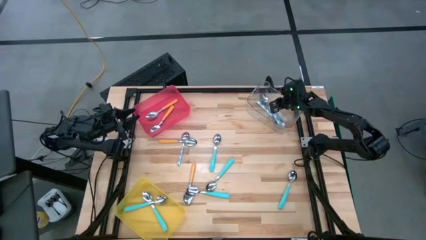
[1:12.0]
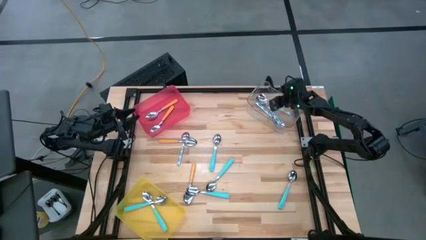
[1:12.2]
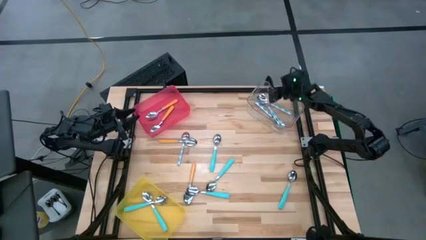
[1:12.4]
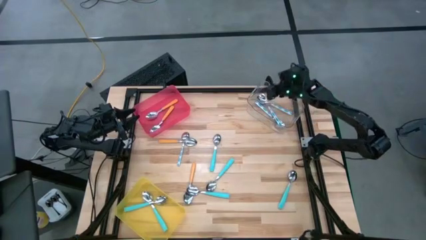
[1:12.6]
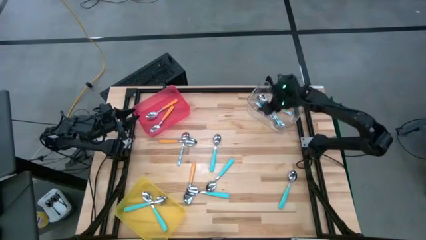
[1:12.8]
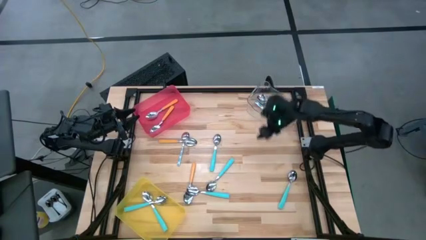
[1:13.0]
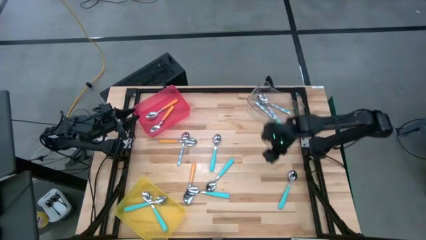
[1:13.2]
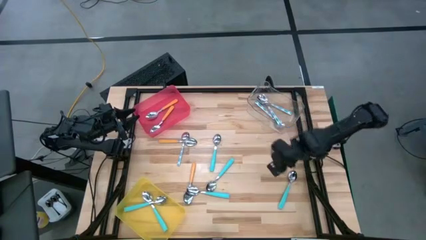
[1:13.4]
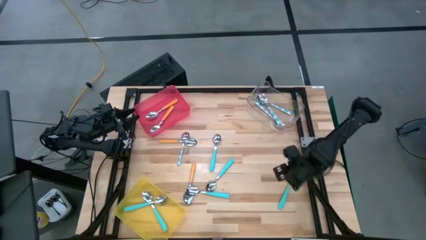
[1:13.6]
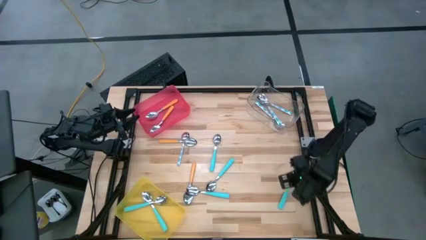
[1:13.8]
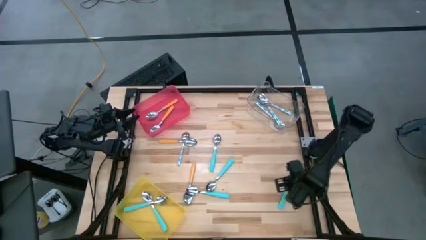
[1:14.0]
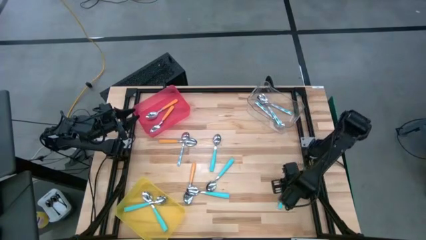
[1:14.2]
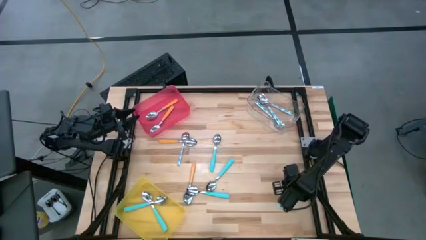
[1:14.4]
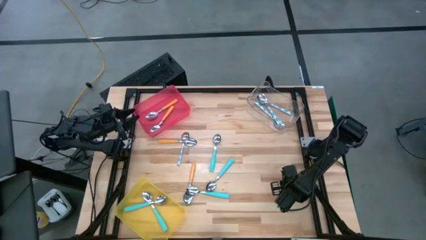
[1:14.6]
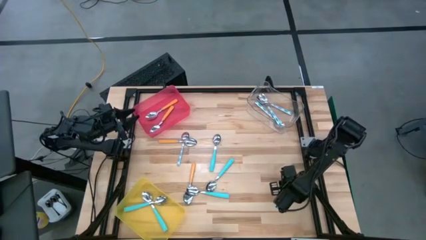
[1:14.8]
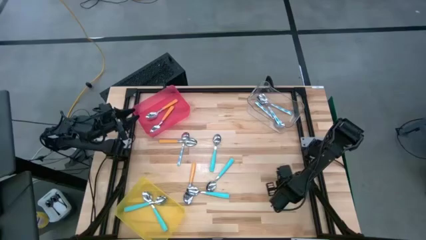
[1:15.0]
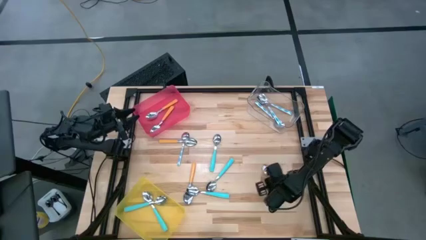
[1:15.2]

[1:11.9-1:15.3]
Task: Sort silverware by color (type)
Put the light blue spoon into the yellow bin

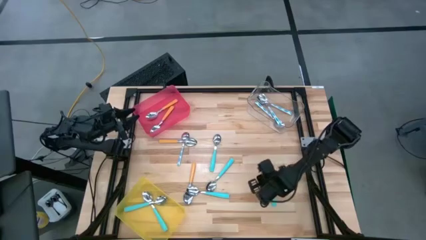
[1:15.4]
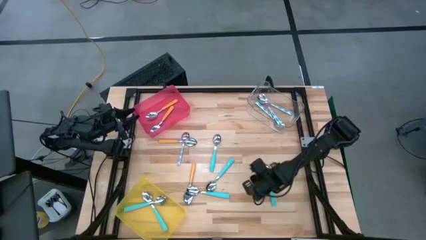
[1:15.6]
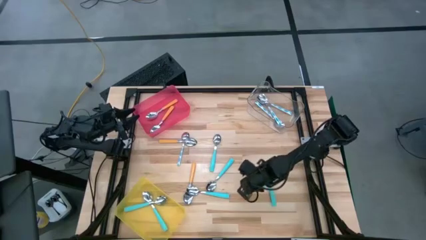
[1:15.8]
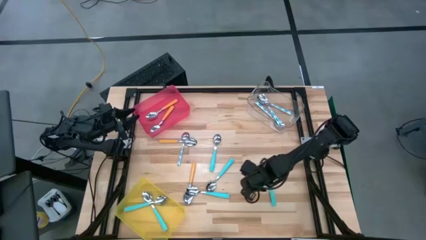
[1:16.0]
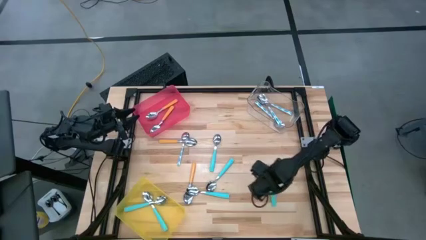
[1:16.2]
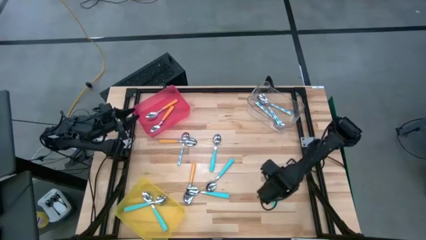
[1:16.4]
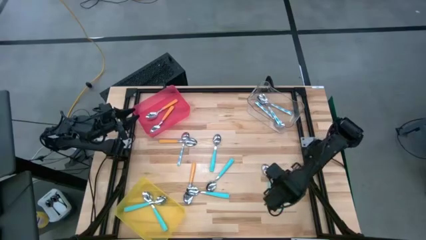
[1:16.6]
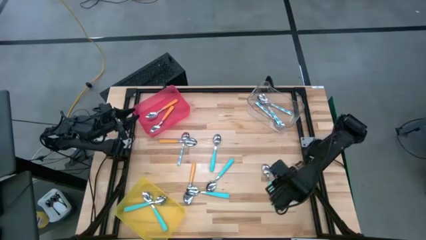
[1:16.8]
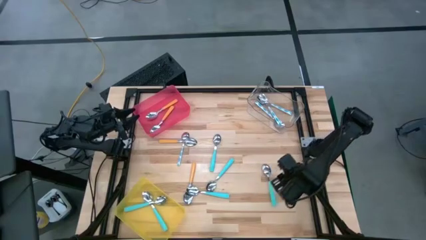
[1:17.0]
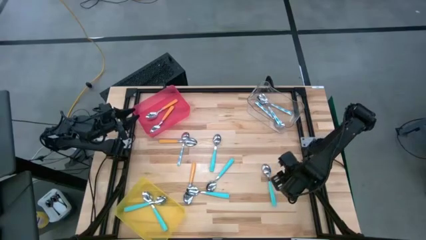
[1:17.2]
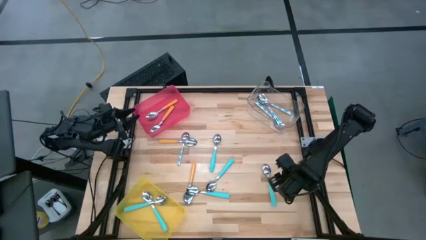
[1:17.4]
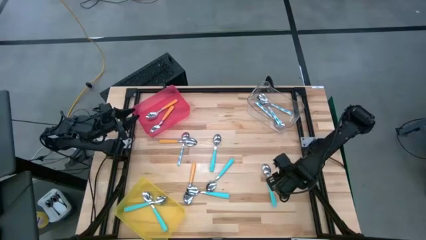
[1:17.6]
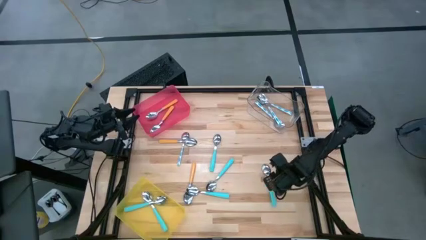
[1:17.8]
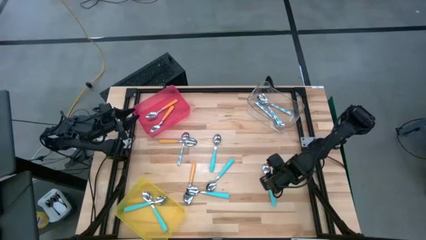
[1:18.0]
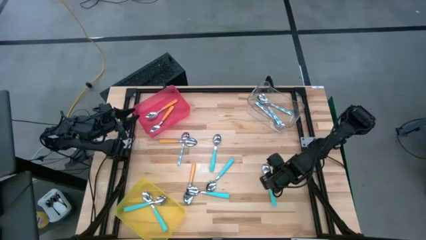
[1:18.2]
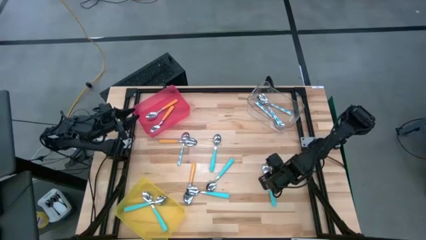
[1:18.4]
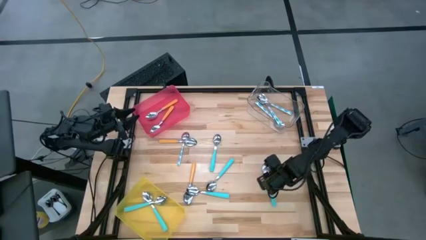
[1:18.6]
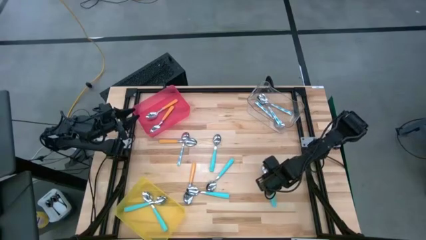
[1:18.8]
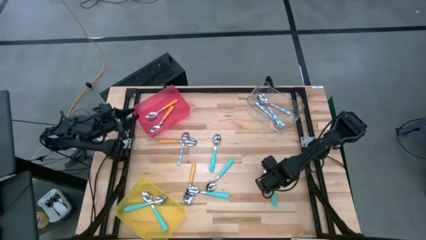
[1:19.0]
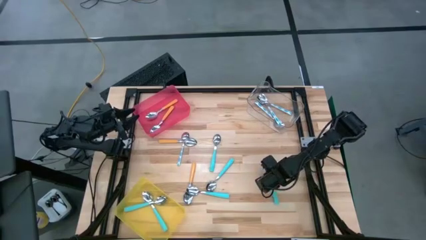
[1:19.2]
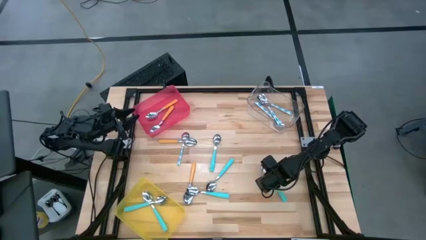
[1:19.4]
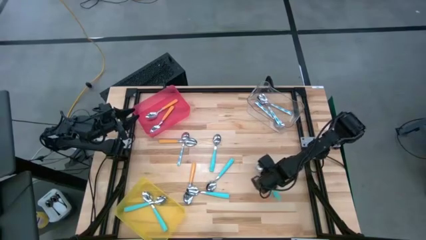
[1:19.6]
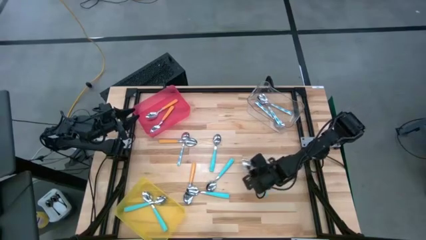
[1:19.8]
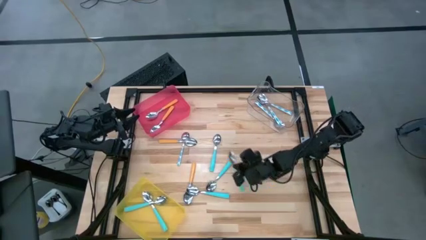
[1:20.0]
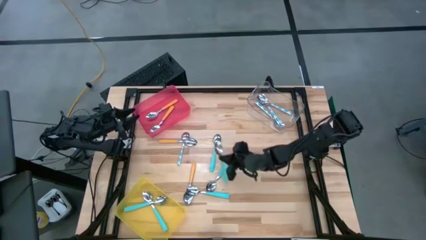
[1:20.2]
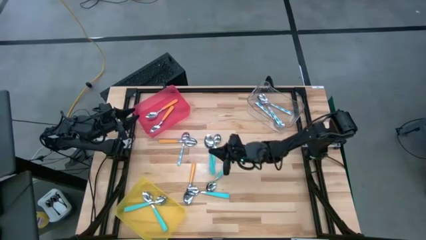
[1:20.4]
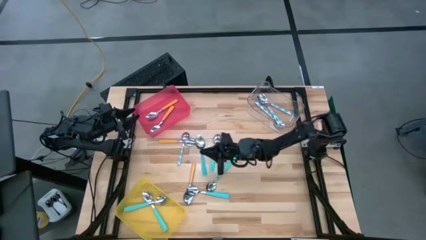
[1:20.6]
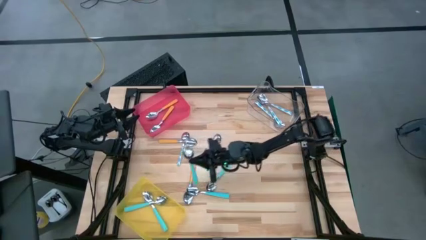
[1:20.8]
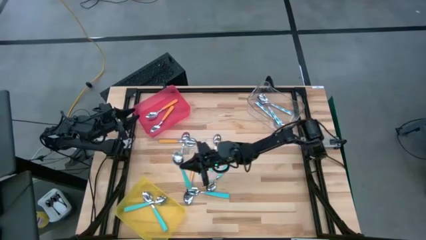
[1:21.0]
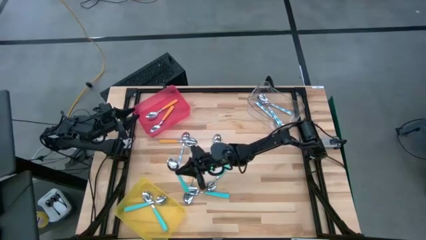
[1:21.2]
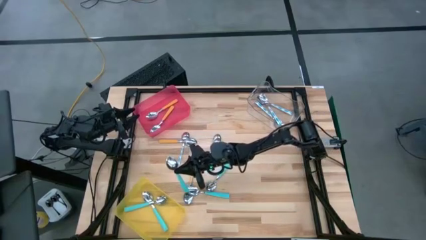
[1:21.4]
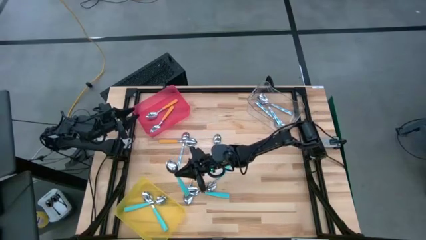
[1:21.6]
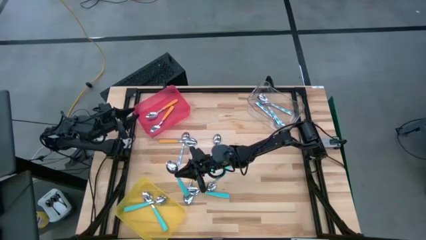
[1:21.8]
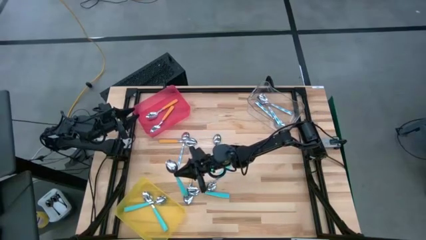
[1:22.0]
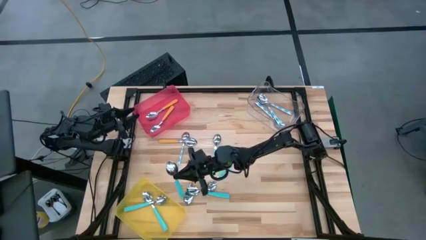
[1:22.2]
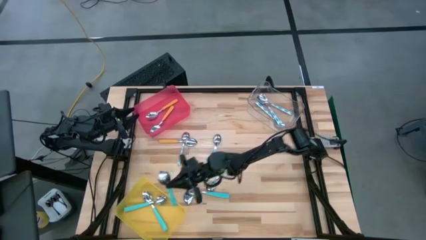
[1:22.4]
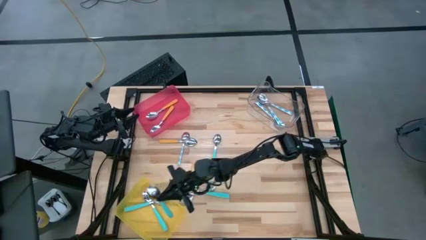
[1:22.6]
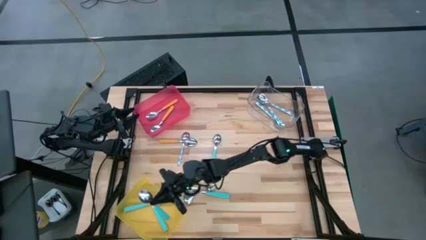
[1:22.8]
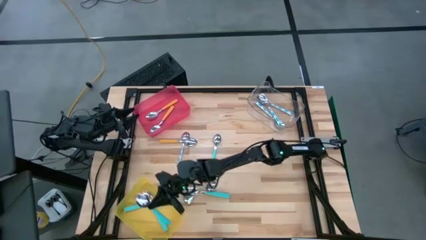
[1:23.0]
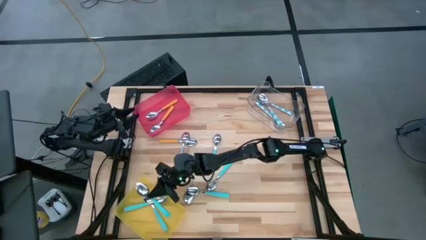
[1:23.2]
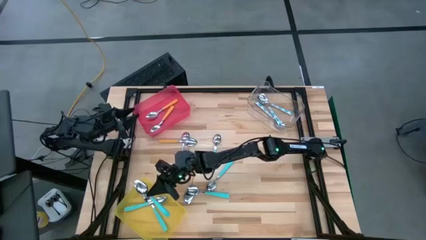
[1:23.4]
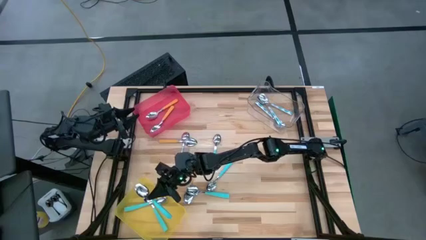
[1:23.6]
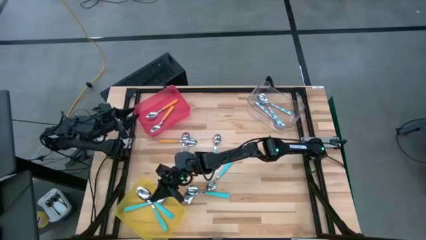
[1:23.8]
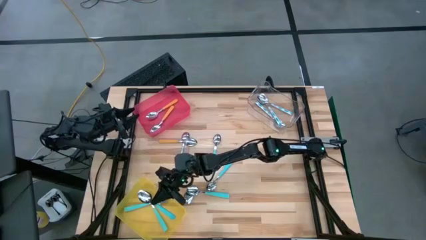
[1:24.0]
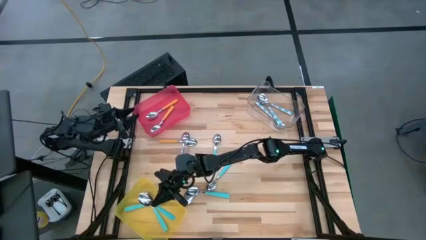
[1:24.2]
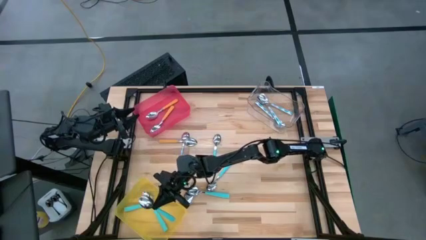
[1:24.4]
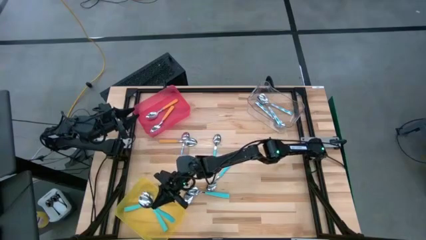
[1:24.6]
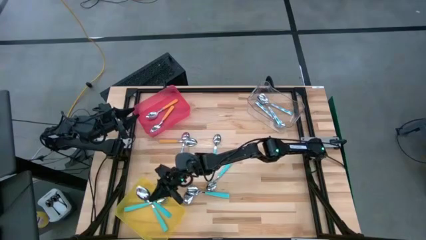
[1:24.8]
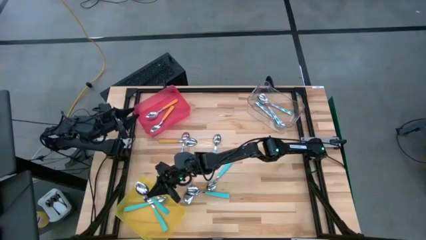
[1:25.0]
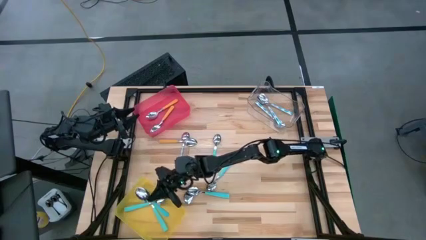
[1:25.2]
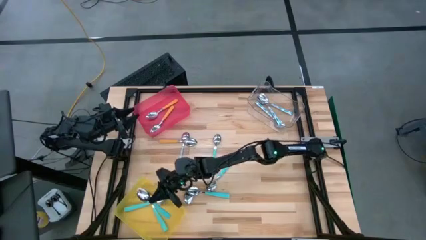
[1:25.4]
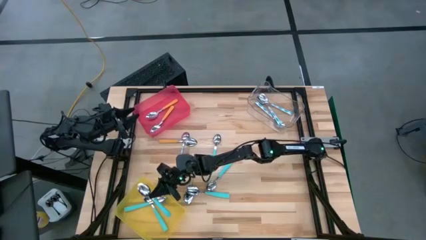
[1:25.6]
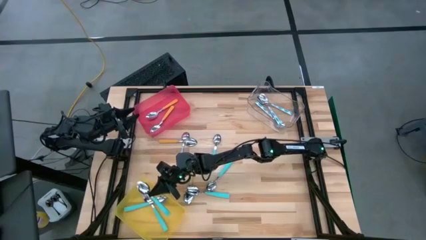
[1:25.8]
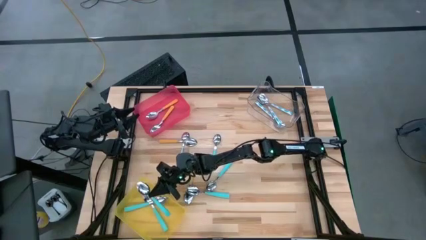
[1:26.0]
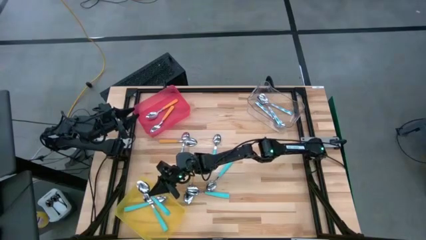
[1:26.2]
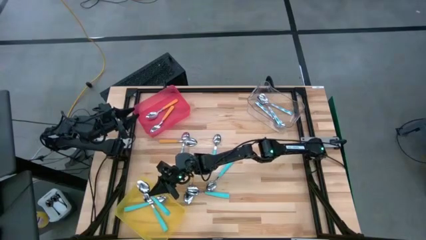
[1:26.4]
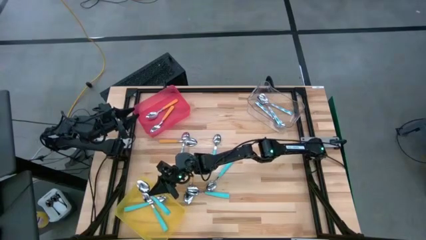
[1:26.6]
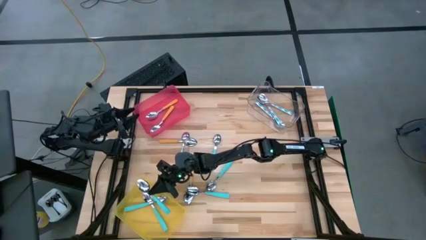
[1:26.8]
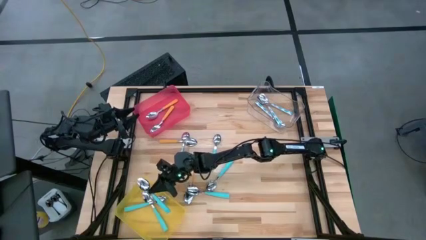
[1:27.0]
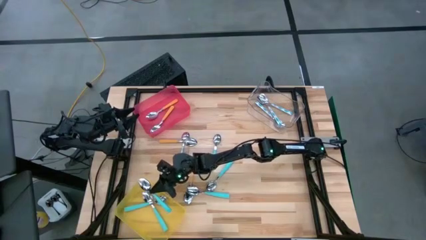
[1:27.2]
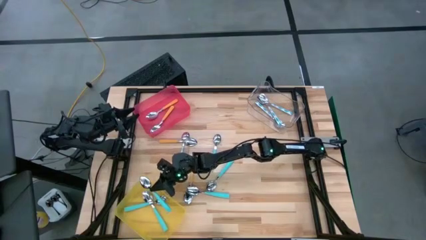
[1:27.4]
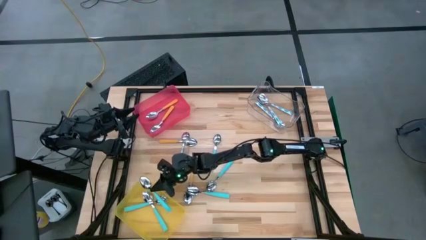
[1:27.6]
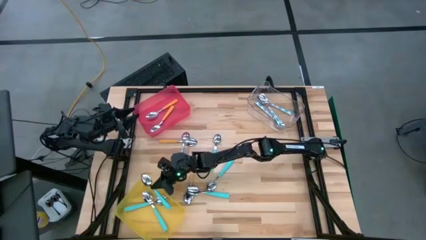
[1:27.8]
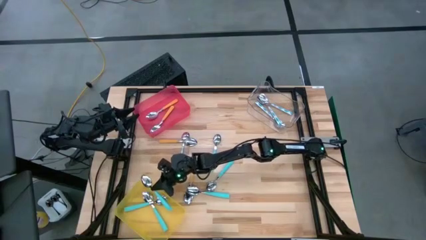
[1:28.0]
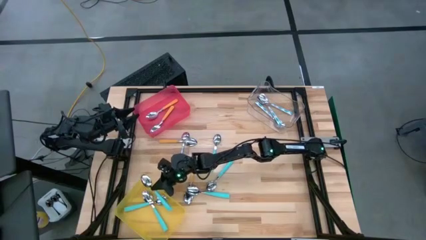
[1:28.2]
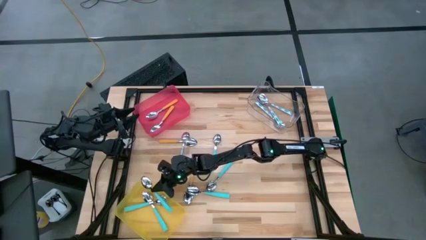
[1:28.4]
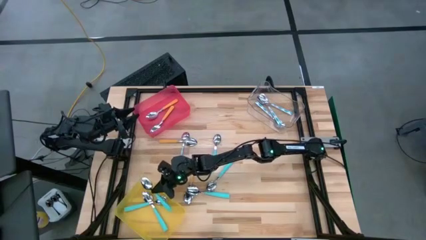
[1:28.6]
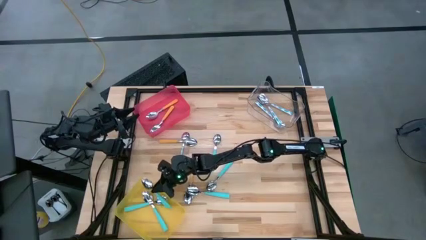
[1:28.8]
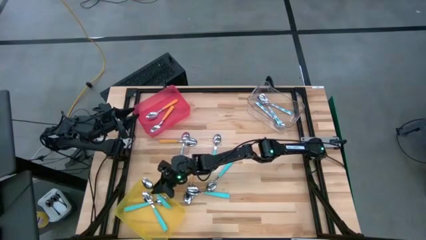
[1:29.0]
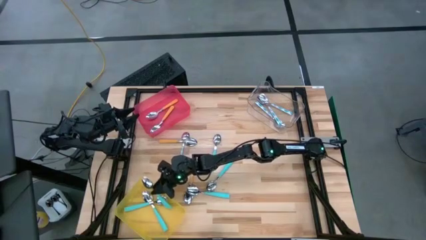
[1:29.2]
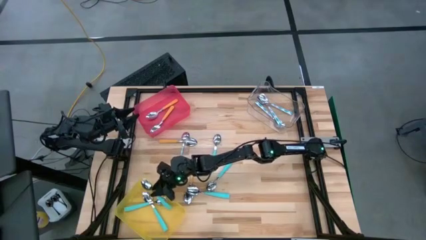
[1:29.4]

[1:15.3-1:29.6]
Put the light blue spoon into the yellow bin
